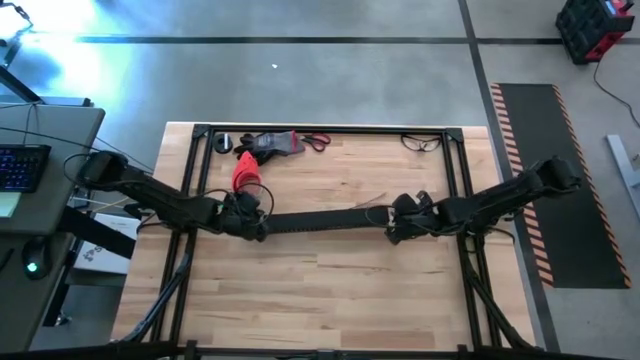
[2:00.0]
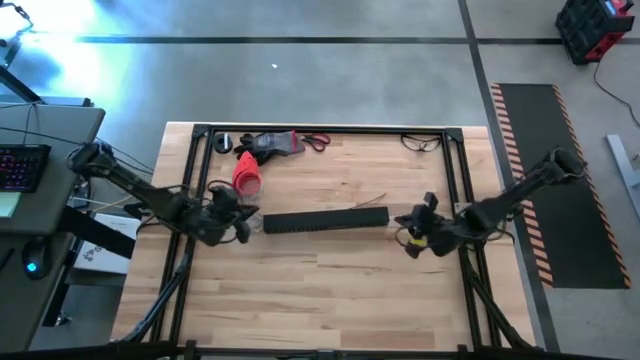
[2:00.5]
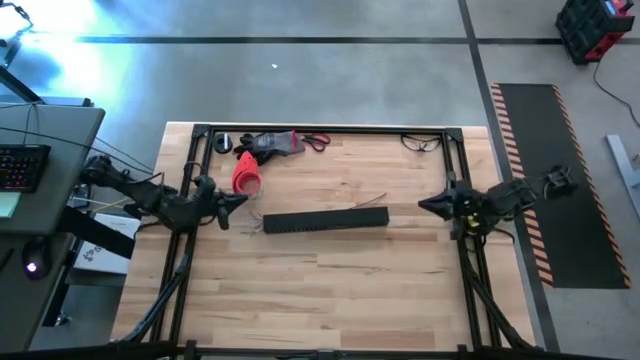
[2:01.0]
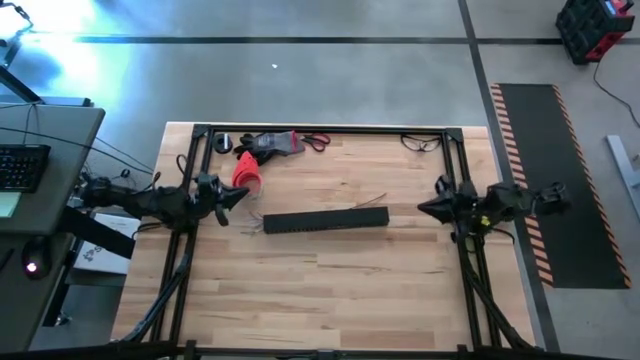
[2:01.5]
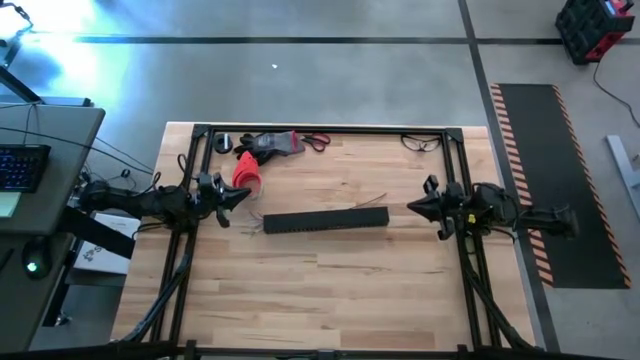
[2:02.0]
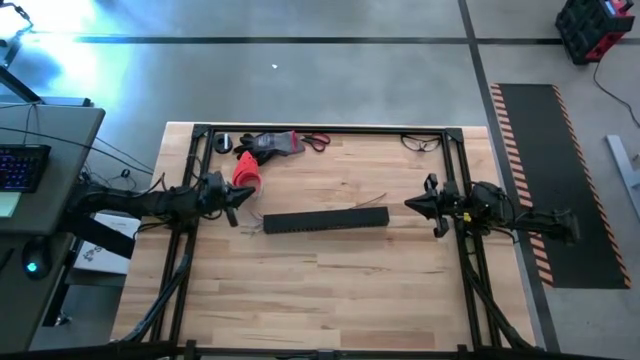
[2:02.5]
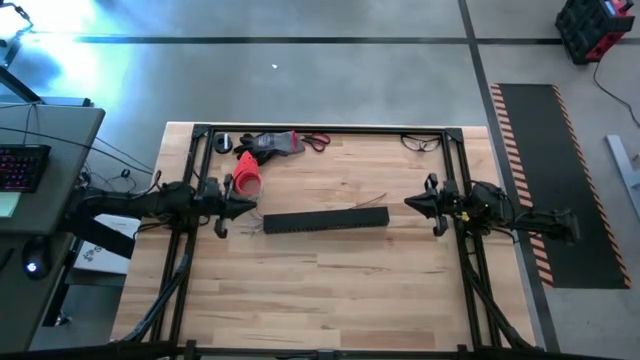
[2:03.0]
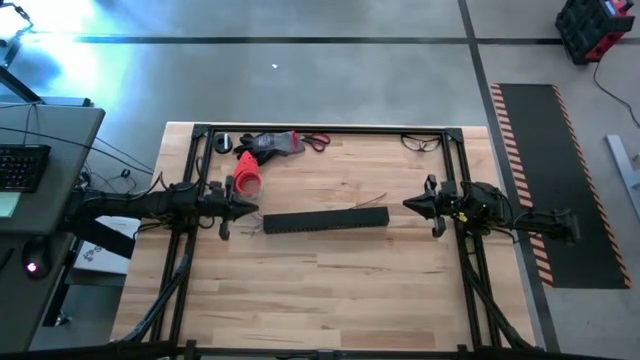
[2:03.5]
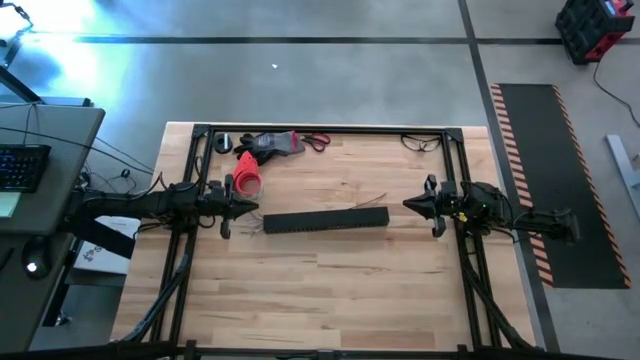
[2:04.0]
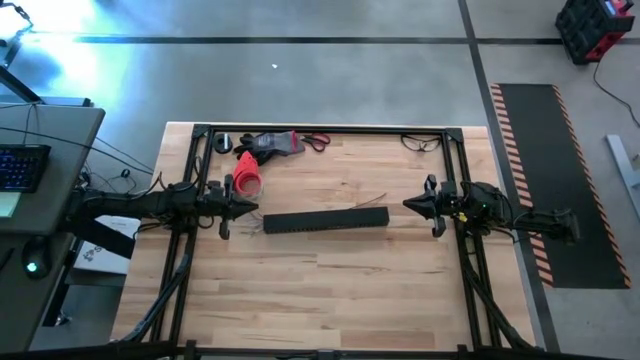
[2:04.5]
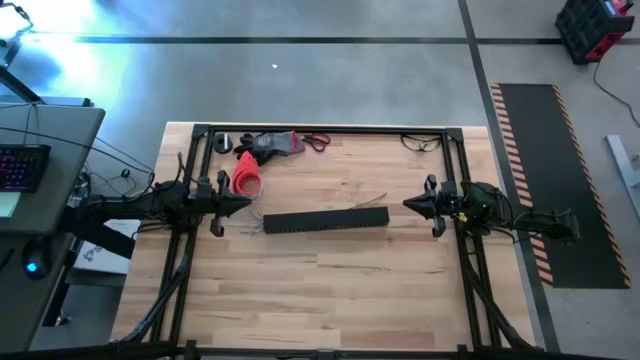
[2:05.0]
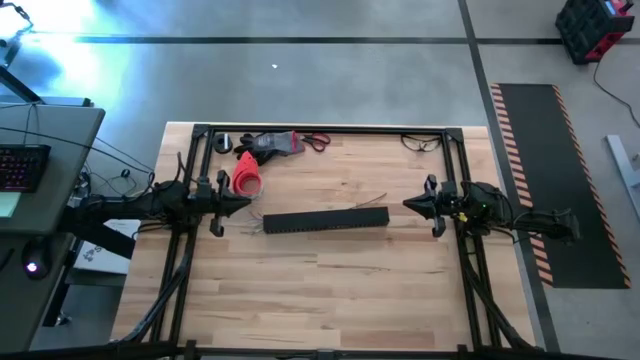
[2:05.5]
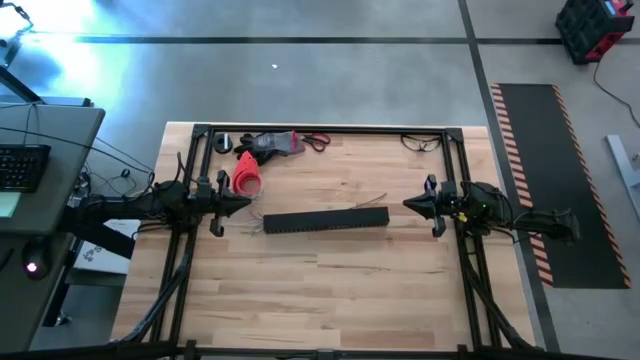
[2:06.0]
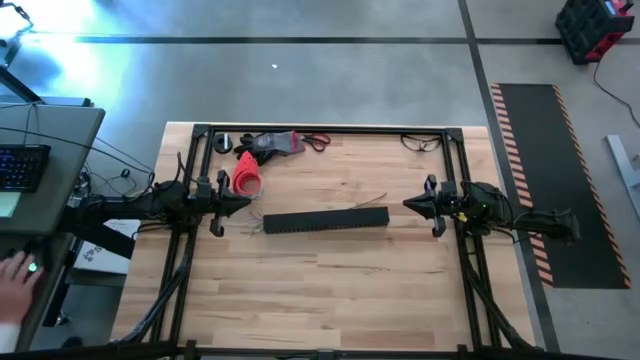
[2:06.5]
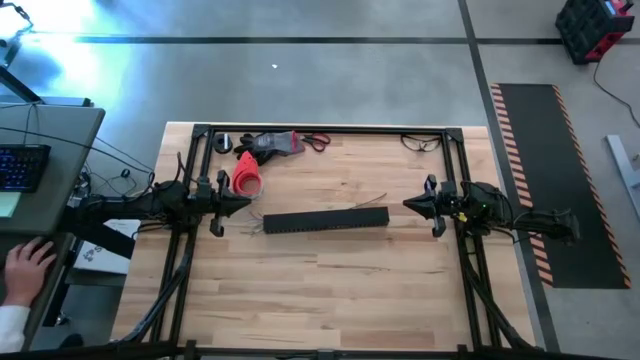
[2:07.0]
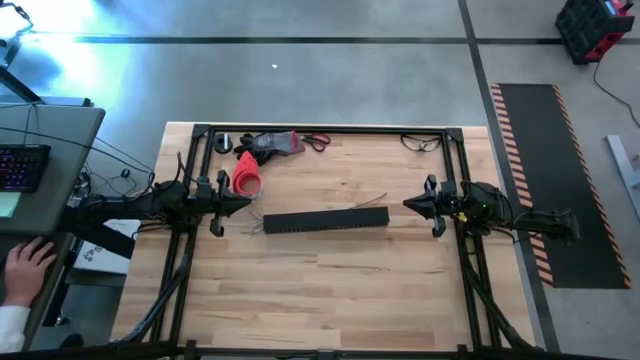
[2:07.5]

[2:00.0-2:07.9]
Task: Ziptie cables
Return to Home Position

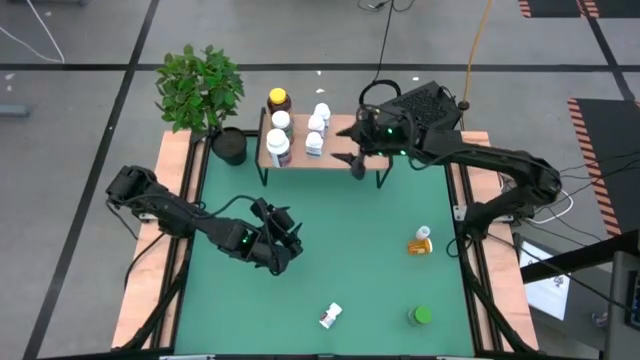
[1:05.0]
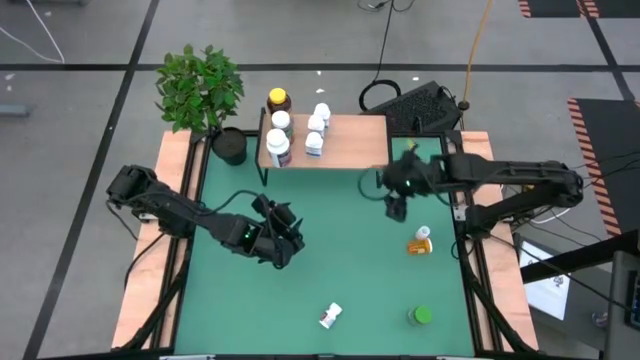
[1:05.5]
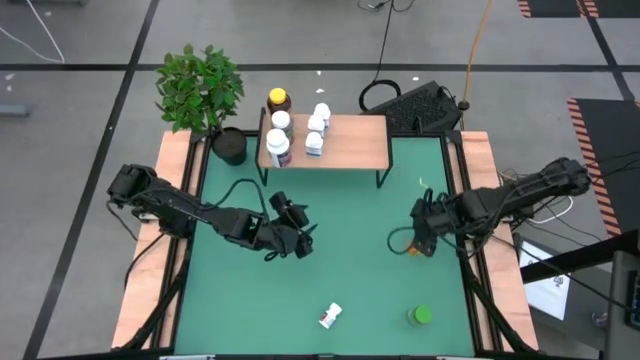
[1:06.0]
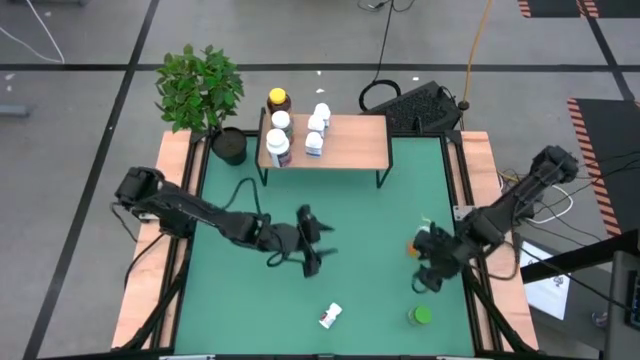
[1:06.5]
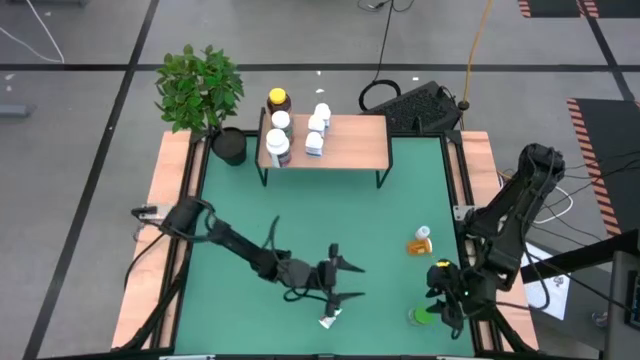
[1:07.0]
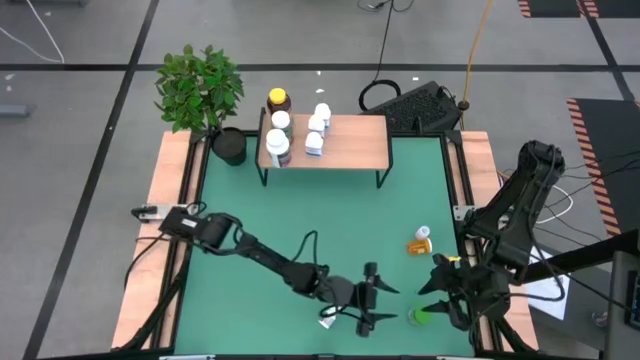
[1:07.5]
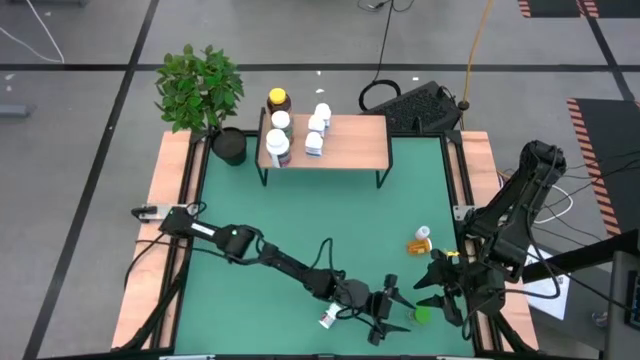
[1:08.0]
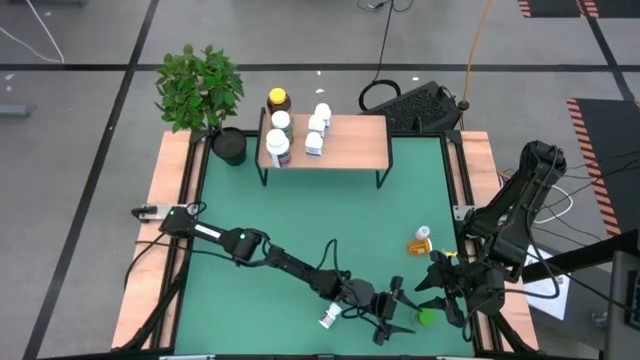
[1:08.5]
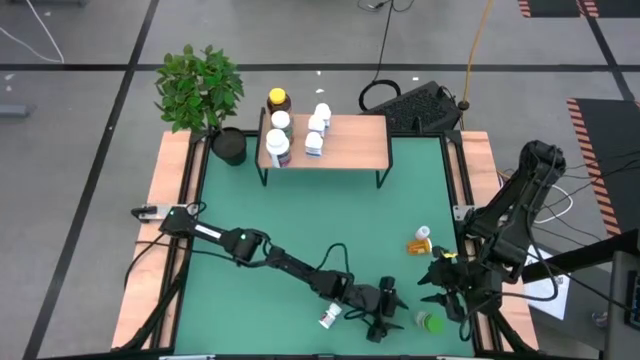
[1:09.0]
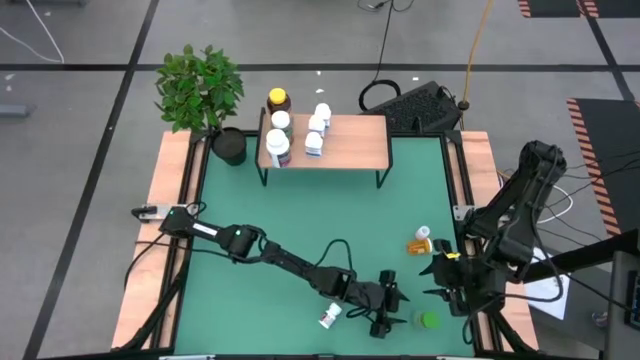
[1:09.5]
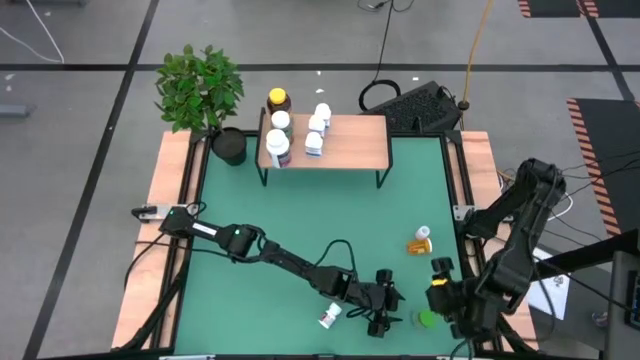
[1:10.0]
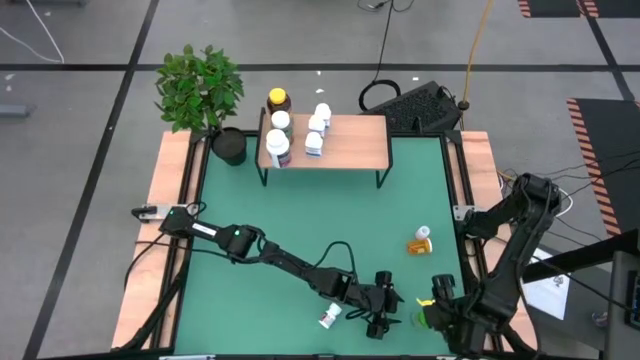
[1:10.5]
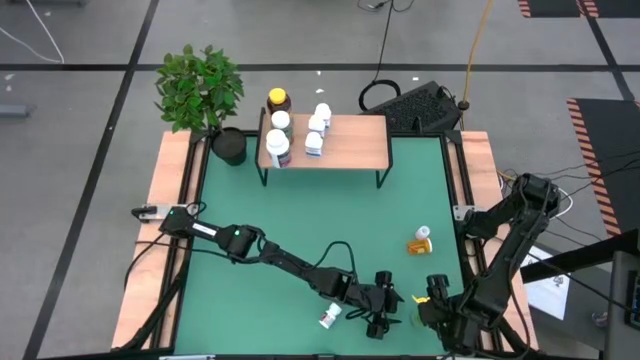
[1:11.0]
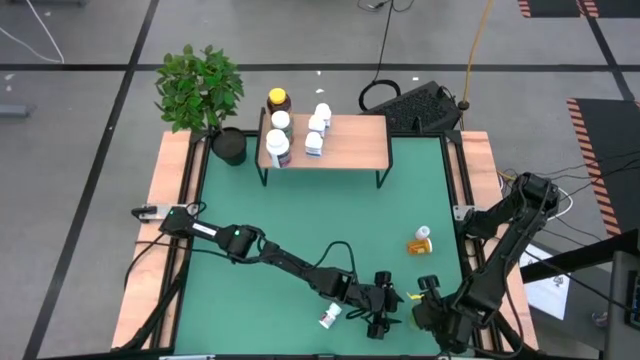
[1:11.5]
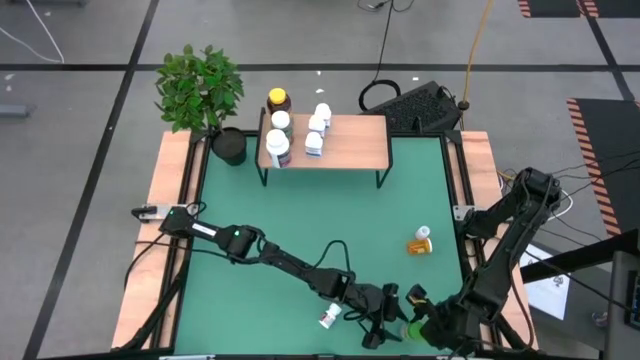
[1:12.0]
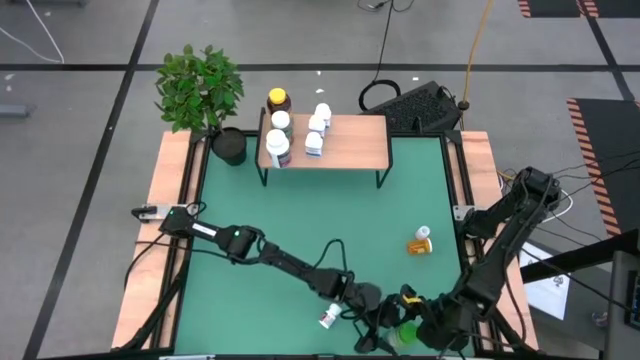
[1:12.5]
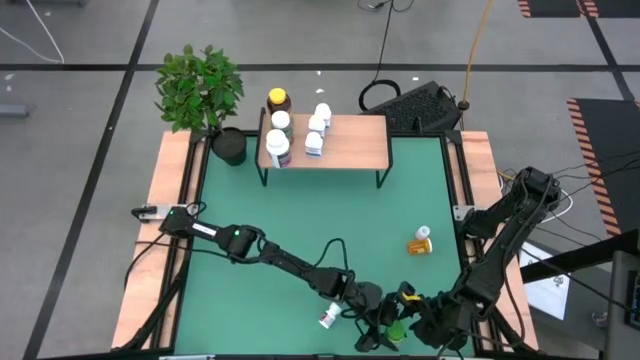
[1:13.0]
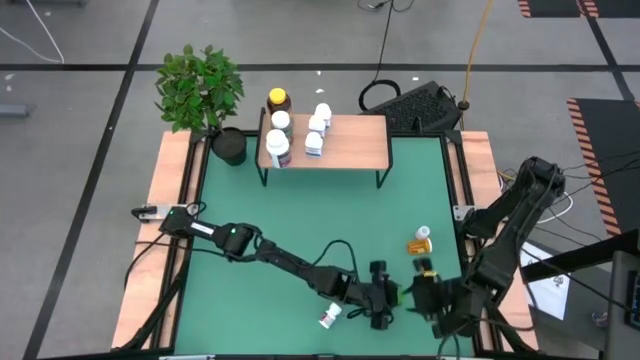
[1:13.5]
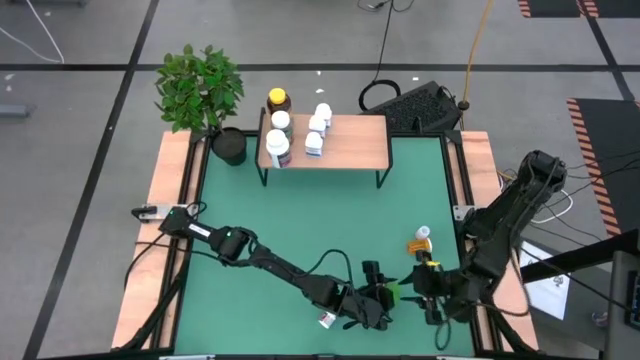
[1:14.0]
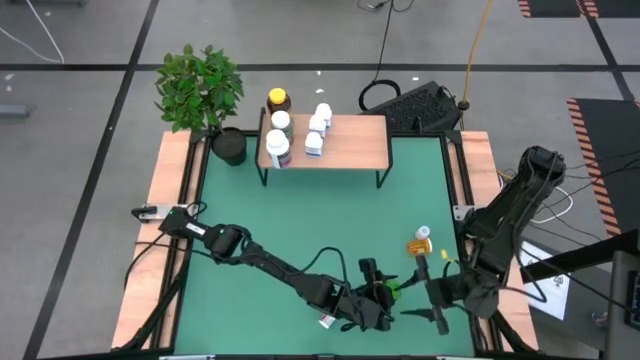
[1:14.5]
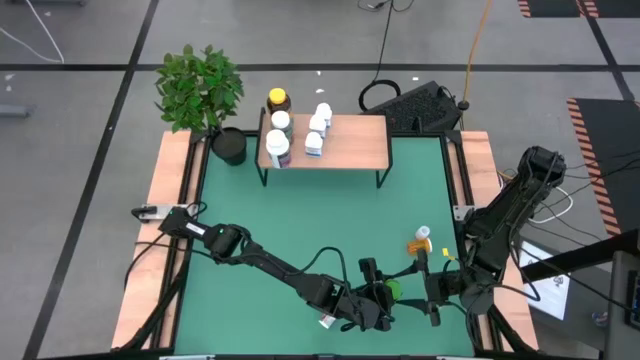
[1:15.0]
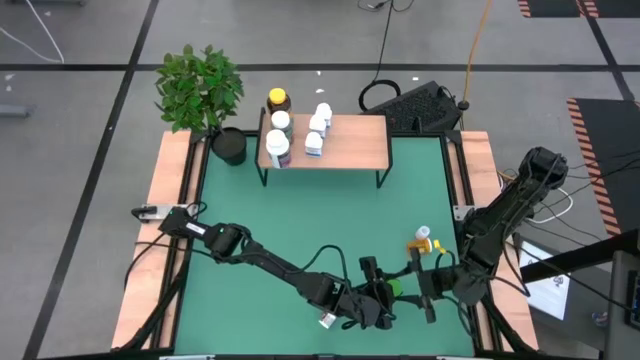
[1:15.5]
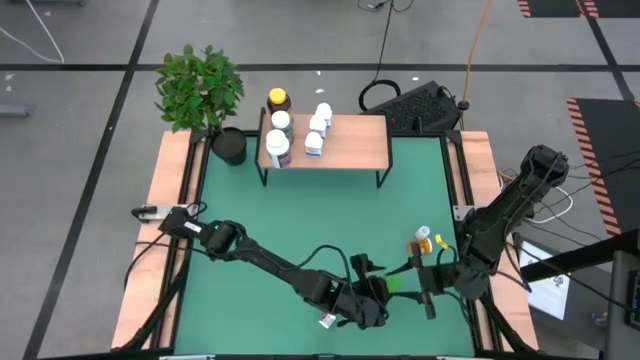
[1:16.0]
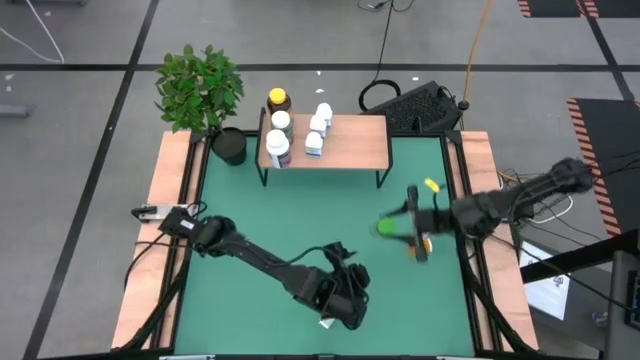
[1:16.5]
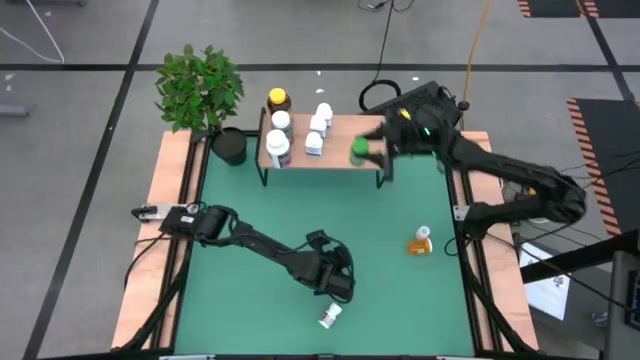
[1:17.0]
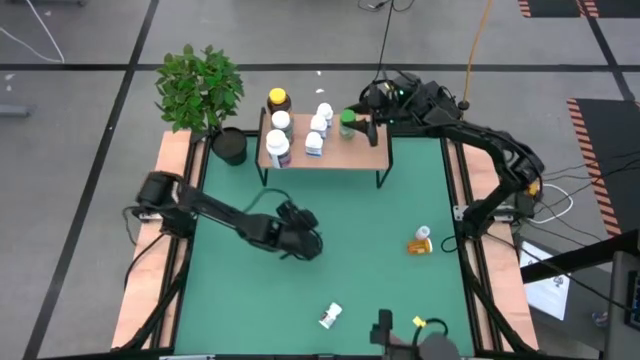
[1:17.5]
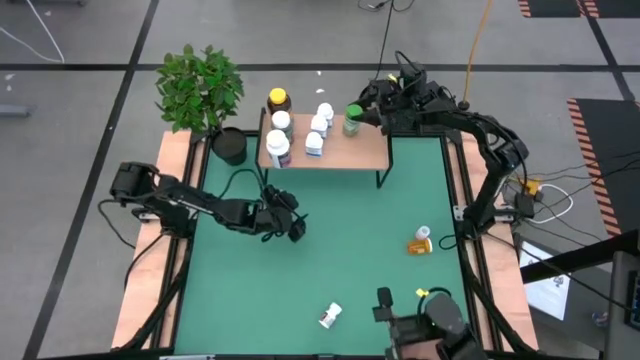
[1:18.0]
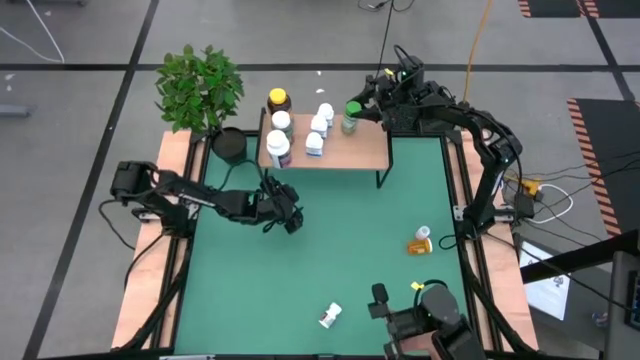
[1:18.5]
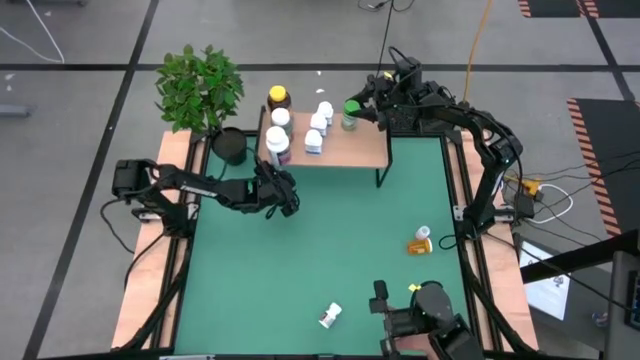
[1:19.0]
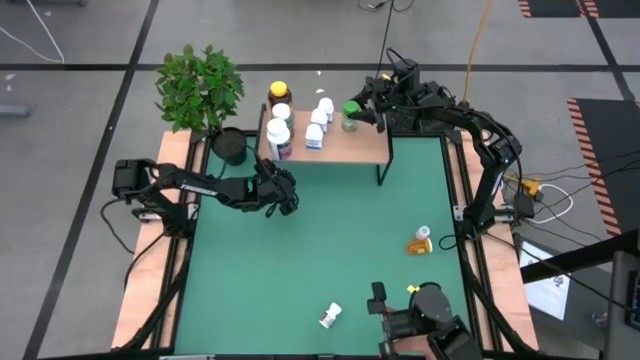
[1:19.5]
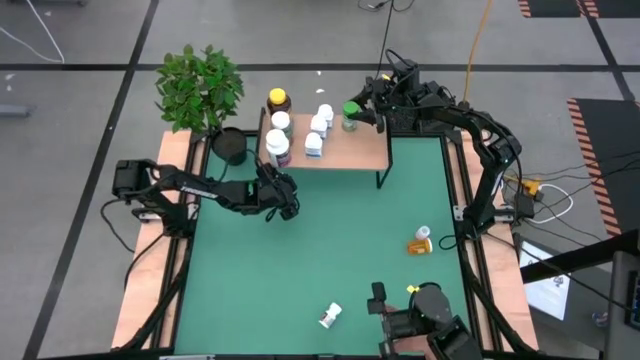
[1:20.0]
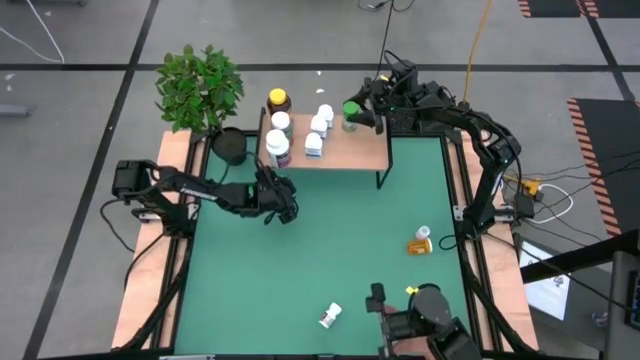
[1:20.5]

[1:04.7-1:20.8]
Task: Pick and place medicine bottles onto shelf by color
Put the green pill bottle on the shelf
